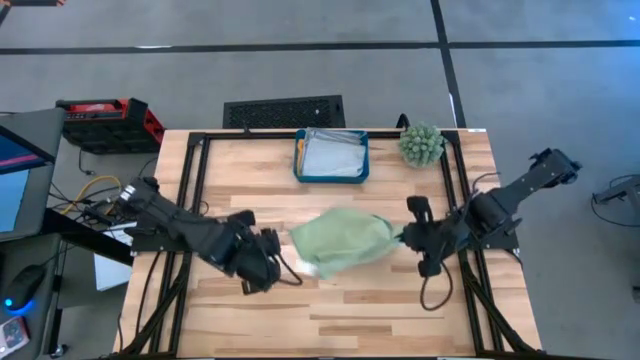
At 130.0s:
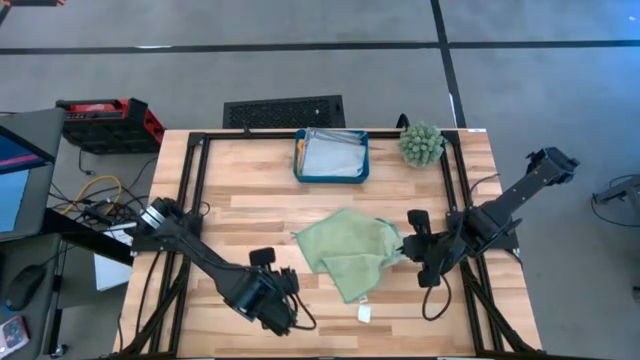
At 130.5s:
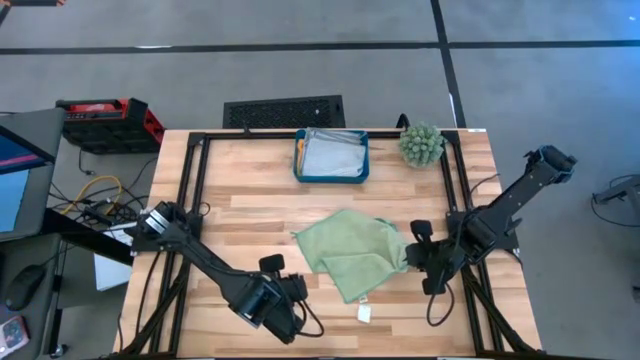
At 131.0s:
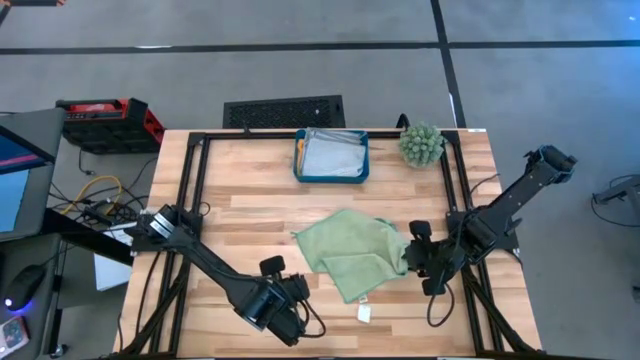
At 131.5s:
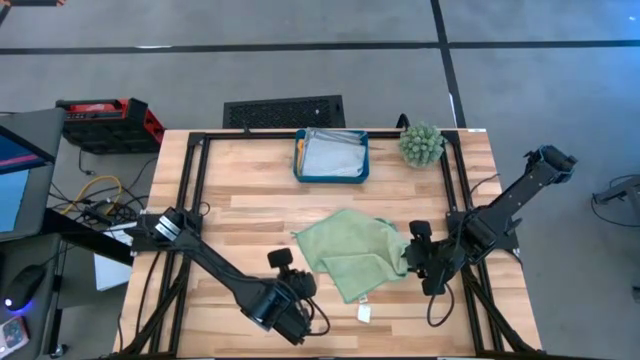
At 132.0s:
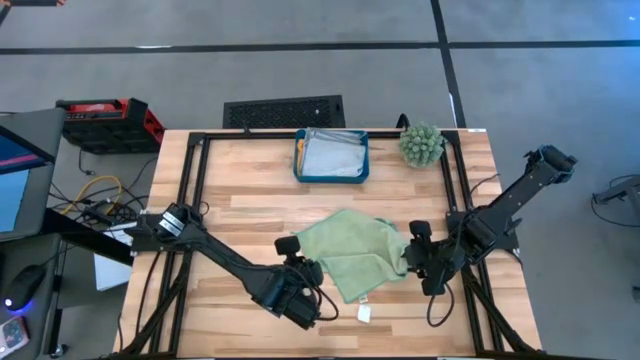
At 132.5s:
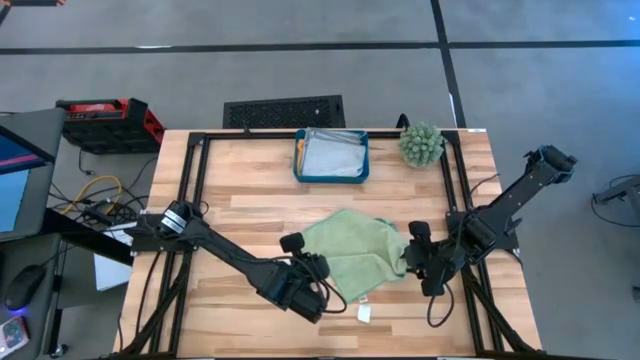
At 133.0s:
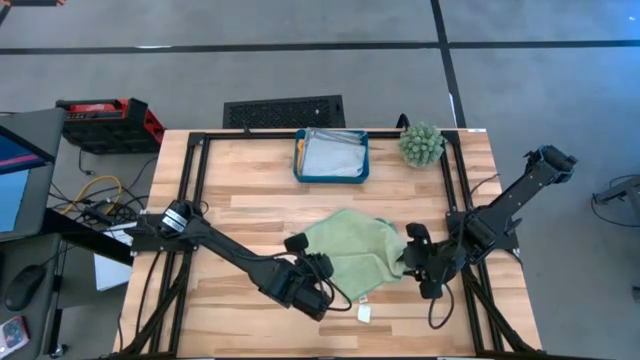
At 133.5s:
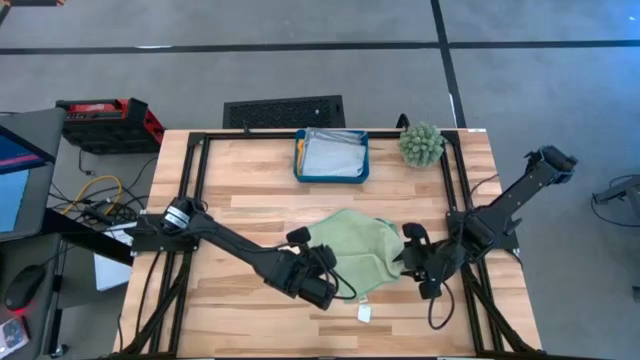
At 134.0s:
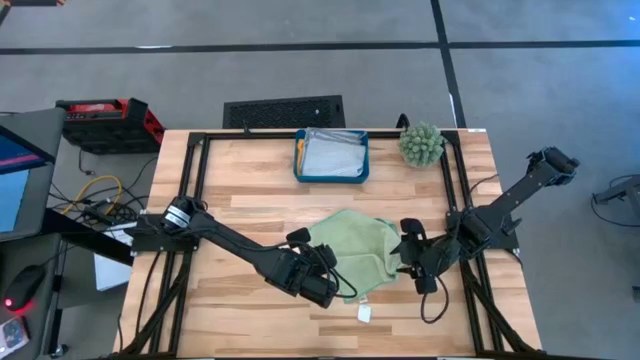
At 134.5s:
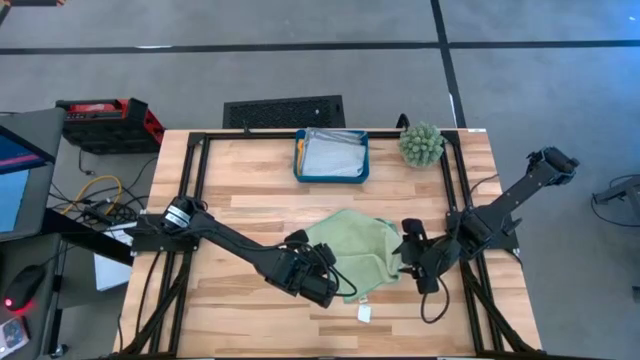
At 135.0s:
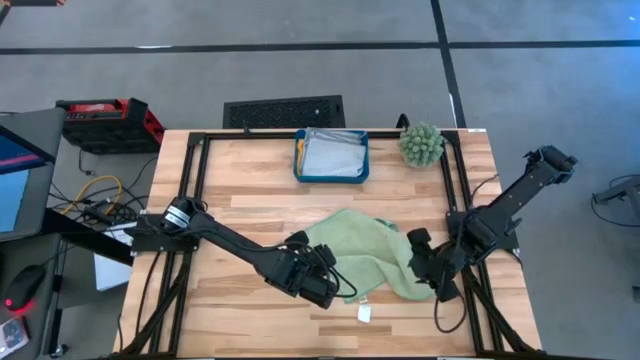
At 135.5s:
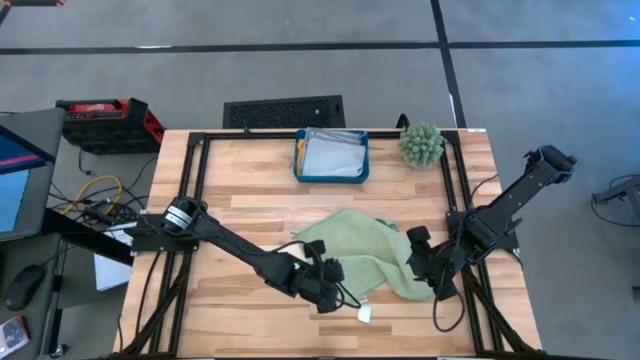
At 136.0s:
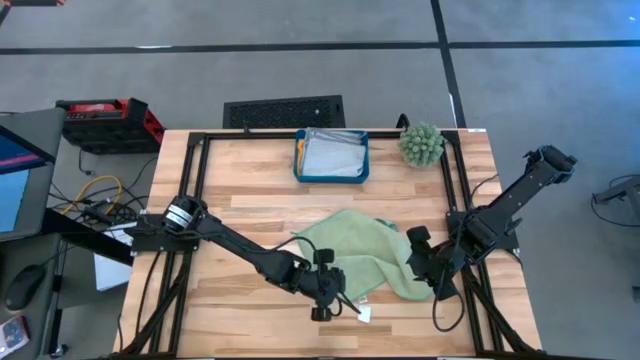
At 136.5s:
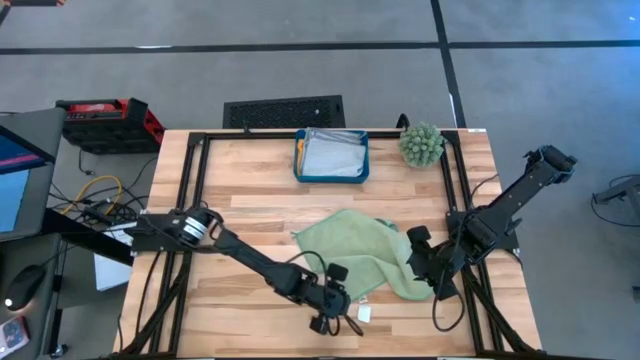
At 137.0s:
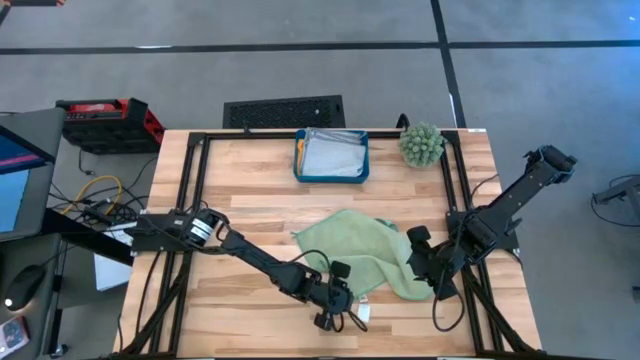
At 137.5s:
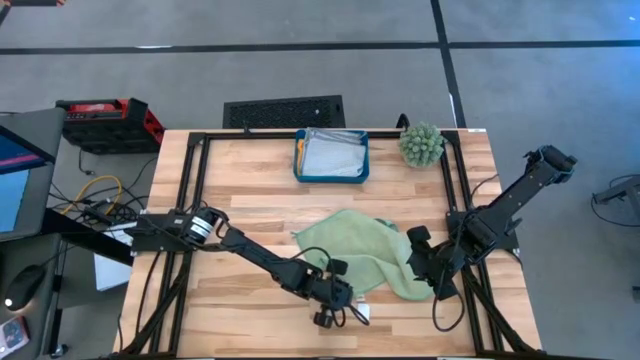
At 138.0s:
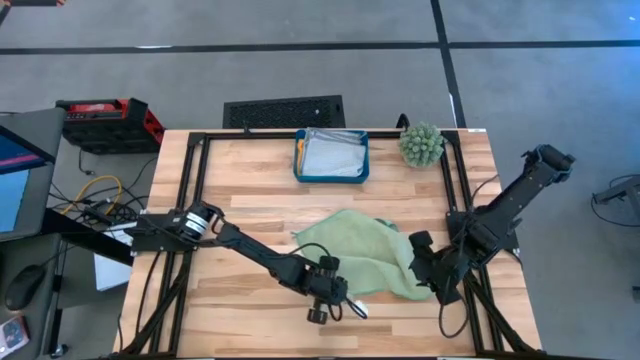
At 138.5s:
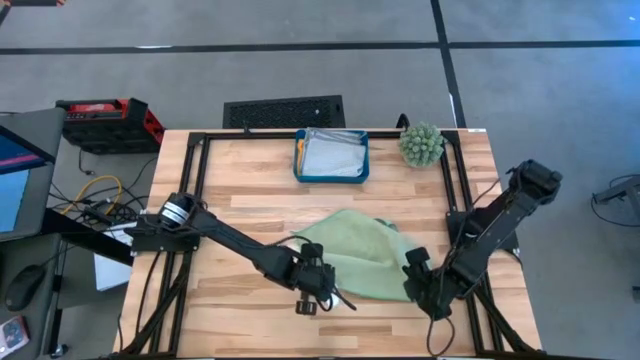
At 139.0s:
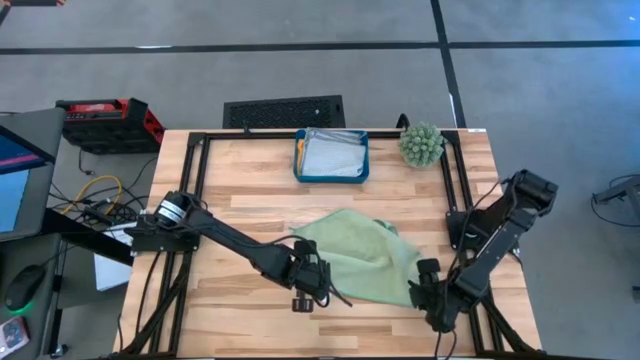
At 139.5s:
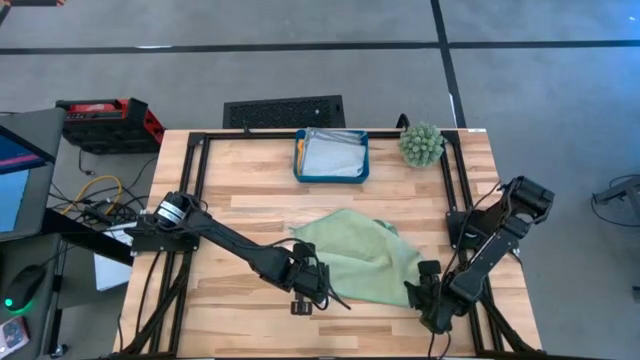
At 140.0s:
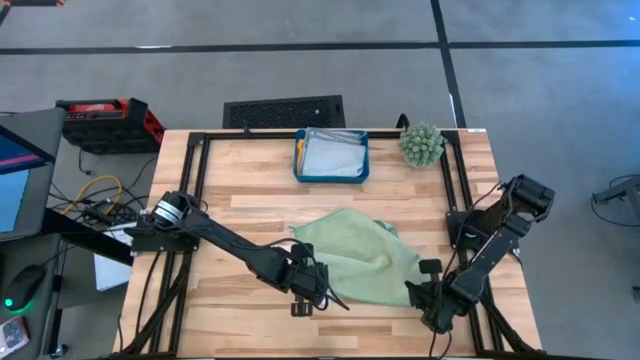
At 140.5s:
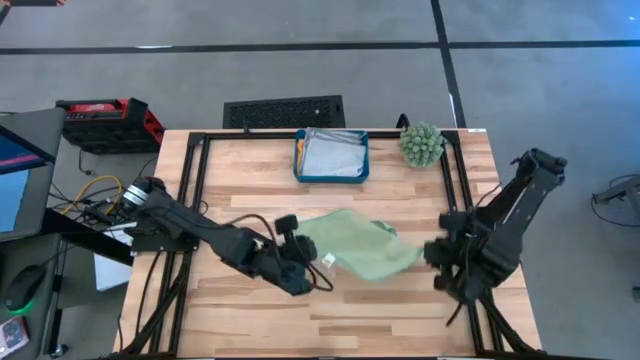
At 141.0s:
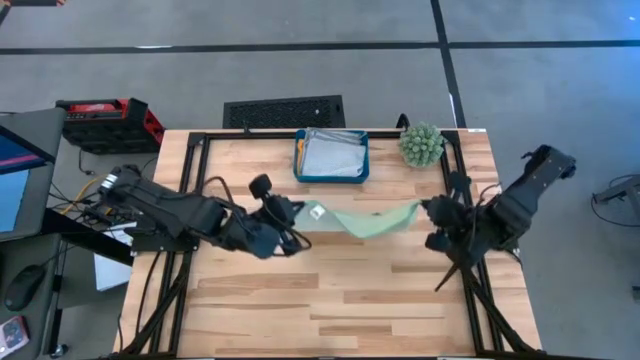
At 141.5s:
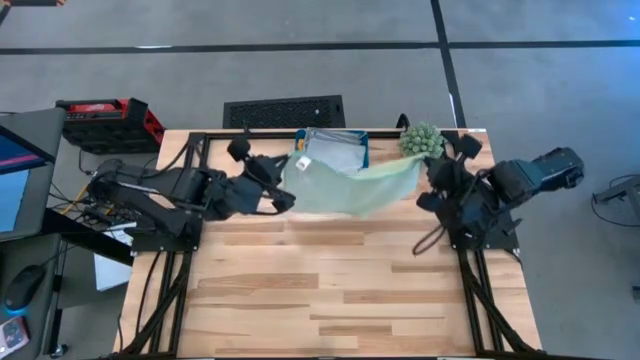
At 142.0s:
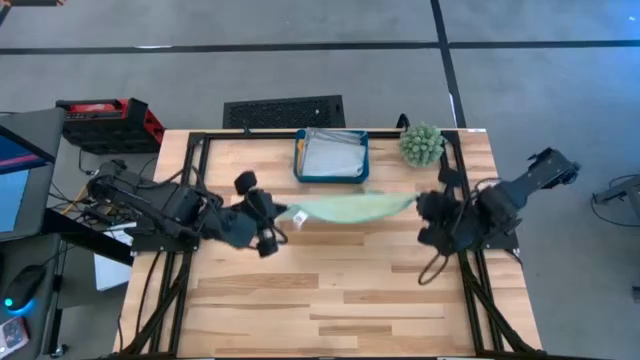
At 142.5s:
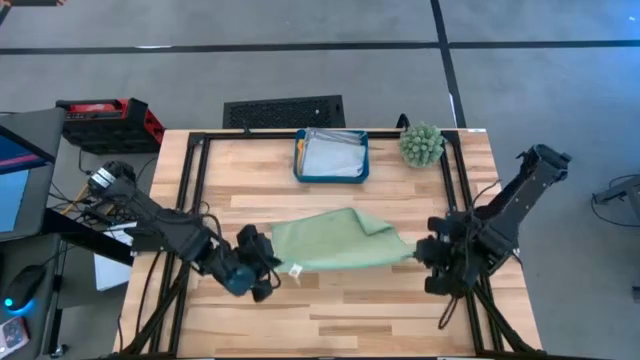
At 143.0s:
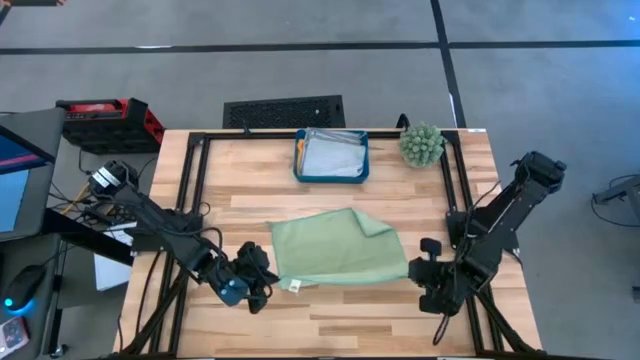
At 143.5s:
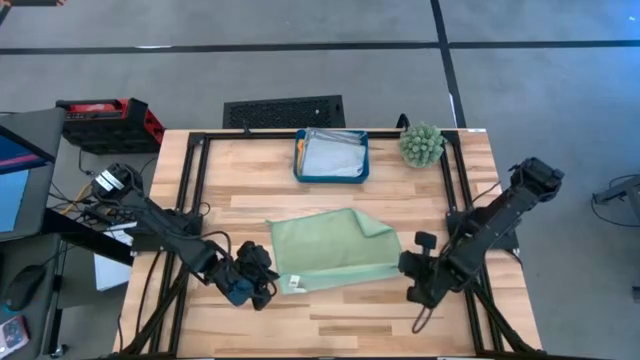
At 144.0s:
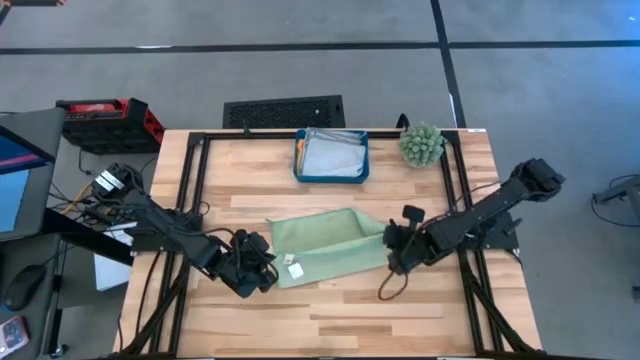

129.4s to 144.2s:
Task: Fold microfiber towels
Fold the green microfiber cloth
